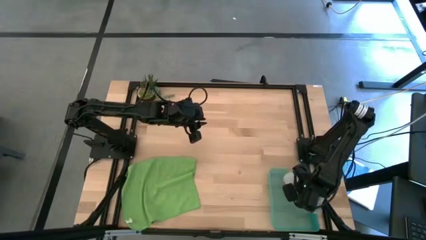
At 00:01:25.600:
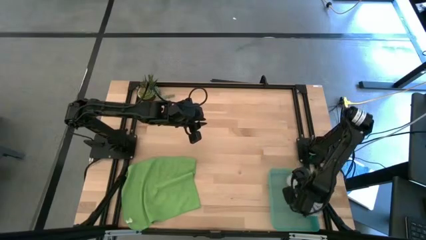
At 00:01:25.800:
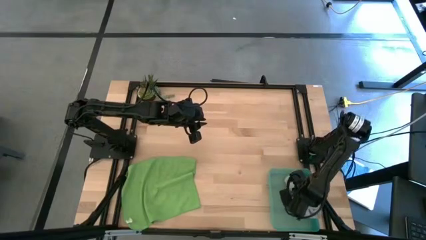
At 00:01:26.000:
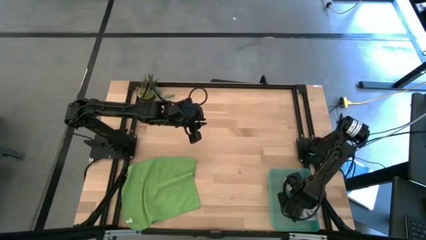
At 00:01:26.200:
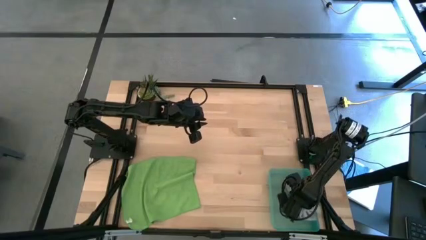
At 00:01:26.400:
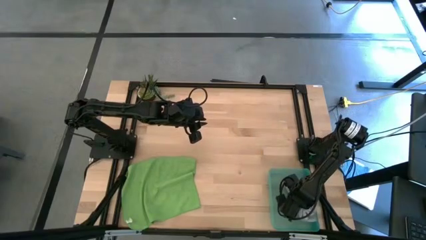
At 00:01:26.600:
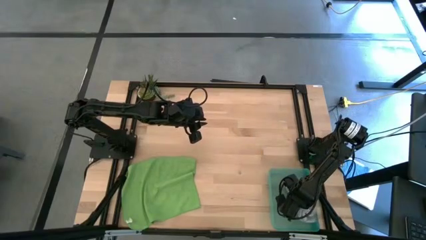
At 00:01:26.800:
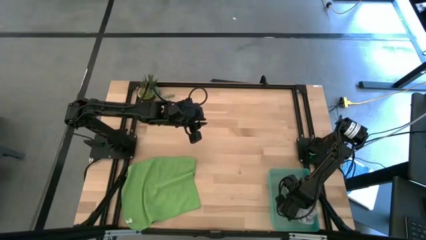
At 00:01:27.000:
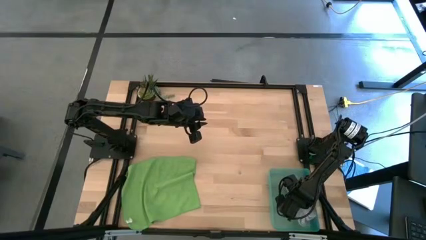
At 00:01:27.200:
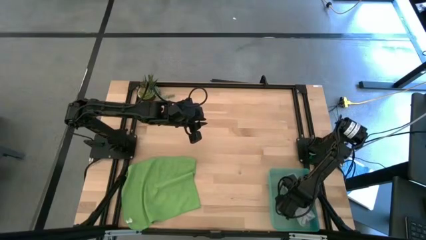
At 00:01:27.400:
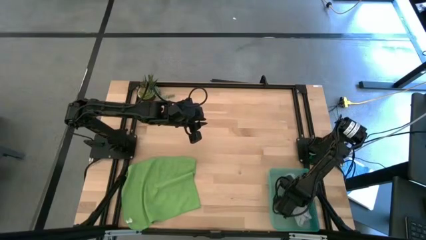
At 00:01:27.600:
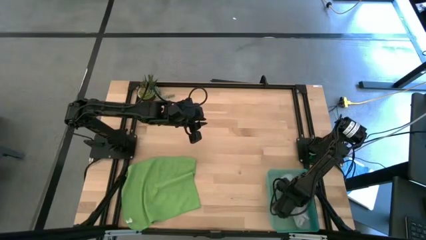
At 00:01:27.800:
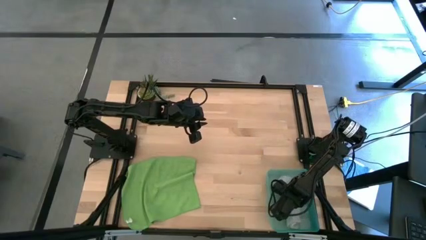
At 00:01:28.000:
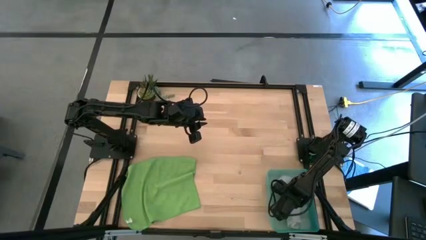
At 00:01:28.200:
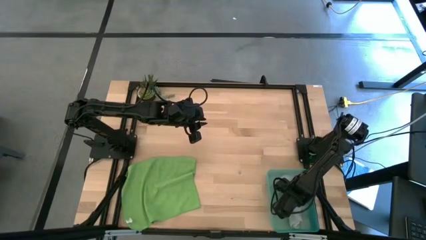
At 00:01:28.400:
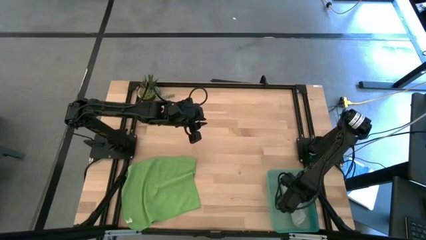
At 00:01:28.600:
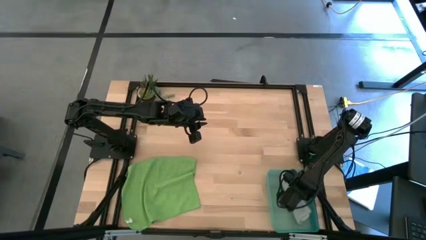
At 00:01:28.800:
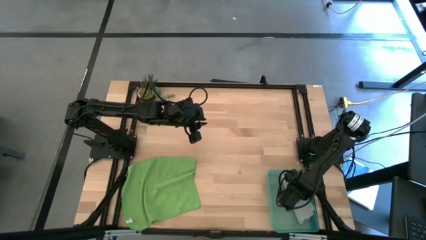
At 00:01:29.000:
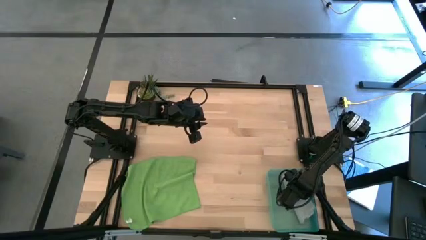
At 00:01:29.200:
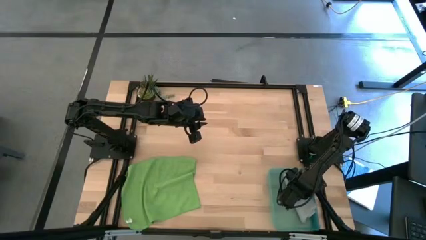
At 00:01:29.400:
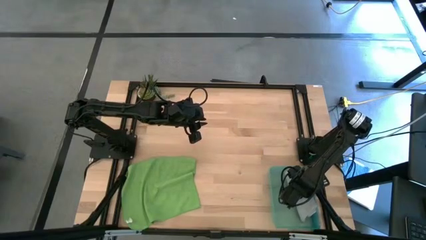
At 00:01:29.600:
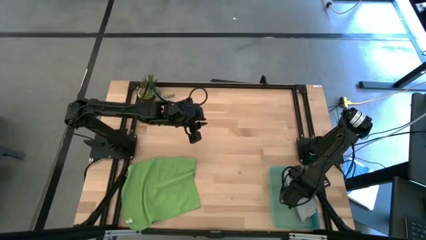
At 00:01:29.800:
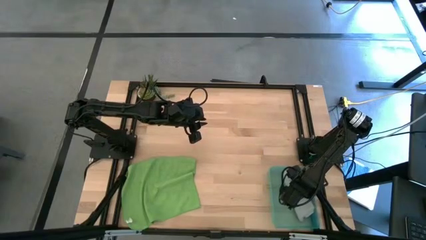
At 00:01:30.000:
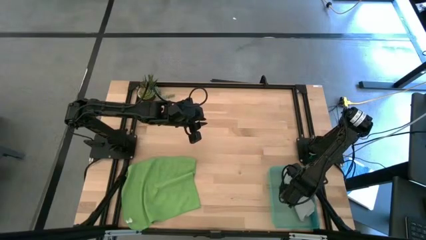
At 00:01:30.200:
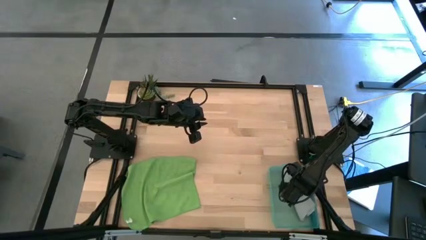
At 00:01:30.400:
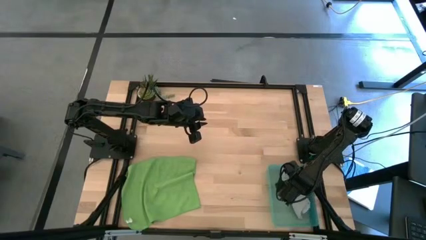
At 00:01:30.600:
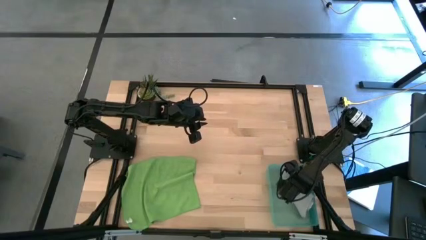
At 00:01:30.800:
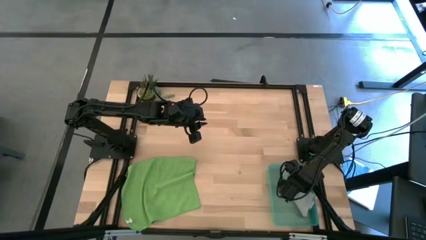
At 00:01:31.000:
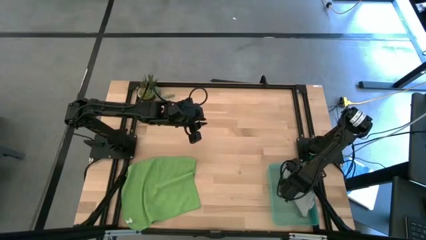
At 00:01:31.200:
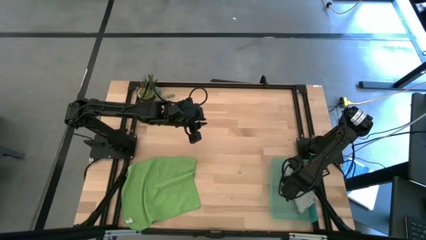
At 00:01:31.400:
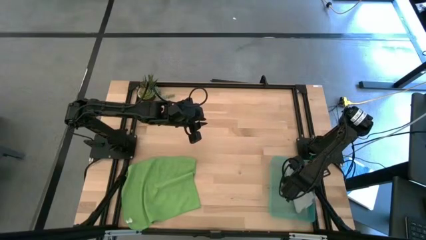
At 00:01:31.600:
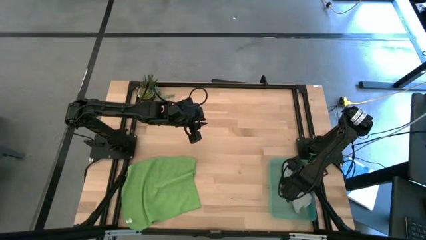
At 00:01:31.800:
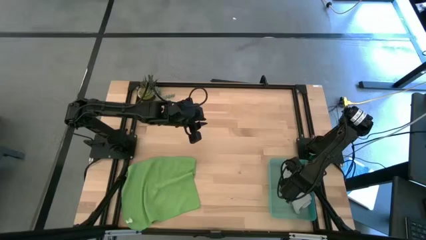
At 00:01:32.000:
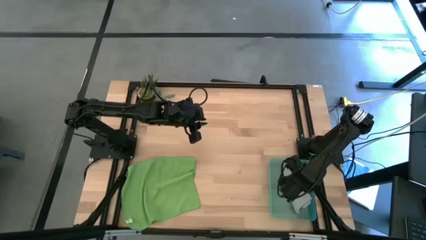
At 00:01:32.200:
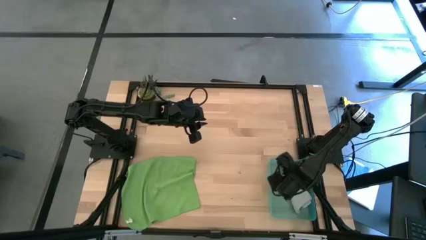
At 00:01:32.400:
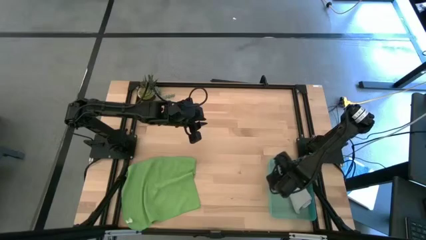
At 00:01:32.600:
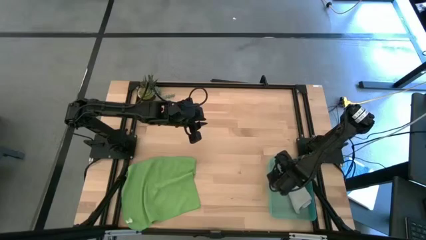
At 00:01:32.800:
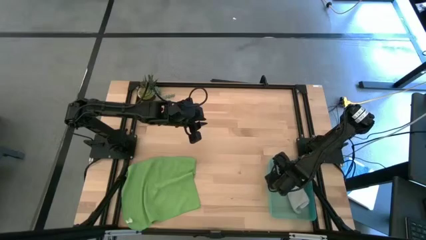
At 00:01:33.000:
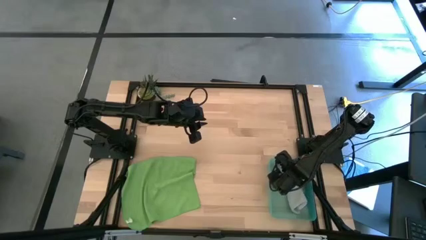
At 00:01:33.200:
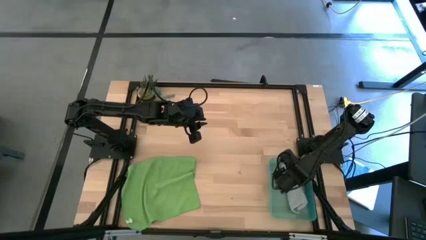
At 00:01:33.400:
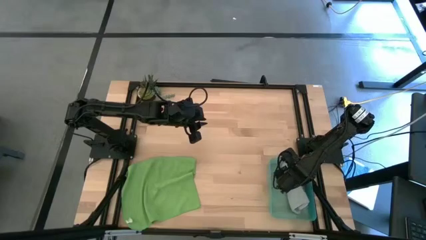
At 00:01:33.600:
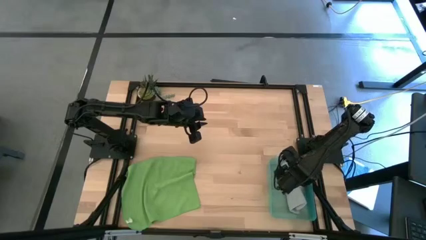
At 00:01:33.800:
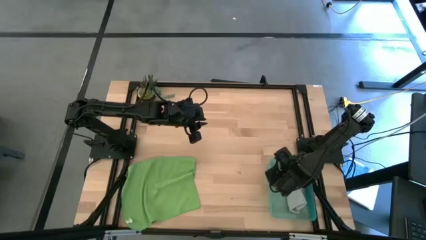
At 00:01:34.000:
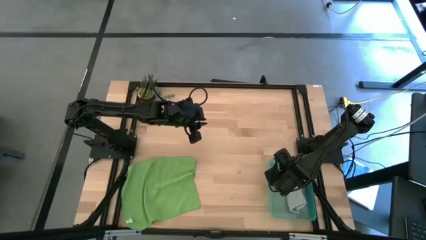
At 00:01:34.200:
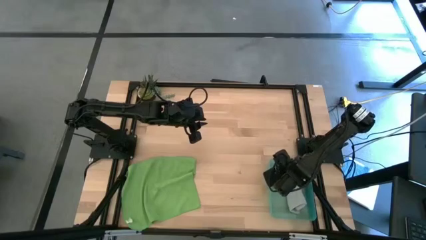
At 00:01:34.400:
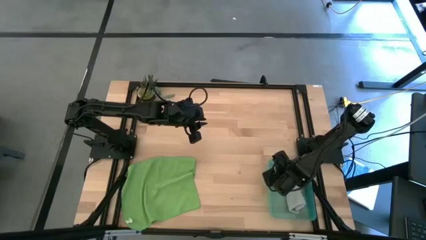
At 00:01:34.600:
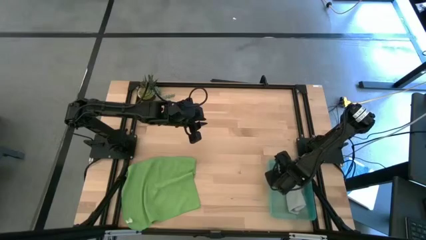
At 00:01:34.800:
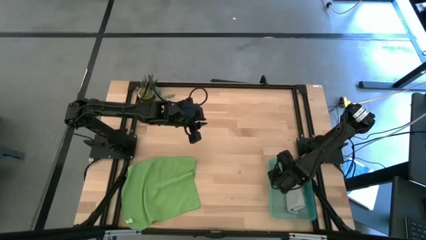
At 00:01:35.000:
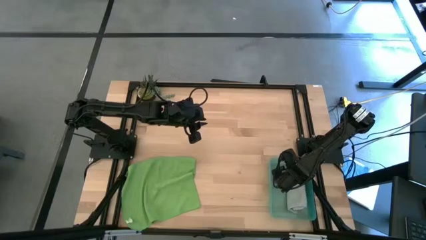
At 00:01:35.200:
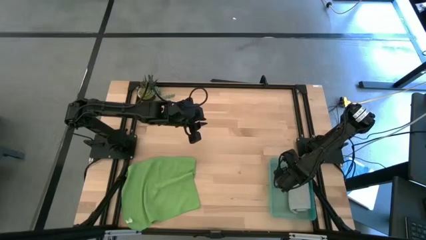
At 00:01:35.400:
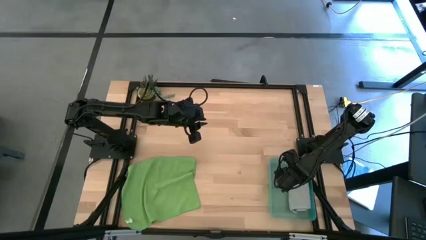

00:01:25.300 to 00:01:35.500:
Task: Roll microfiber towels into tight, uniform cylinder then place into a basket
Put the gray microfiber towel into the green bin

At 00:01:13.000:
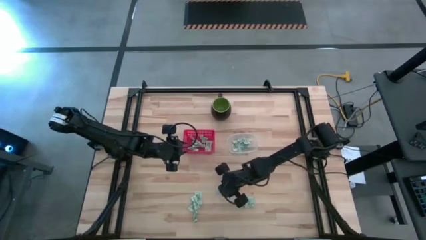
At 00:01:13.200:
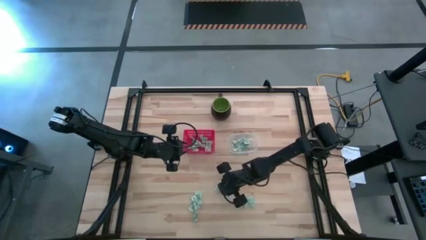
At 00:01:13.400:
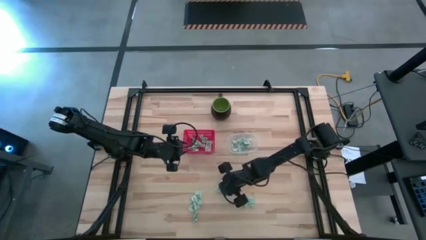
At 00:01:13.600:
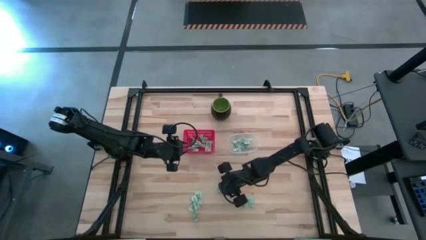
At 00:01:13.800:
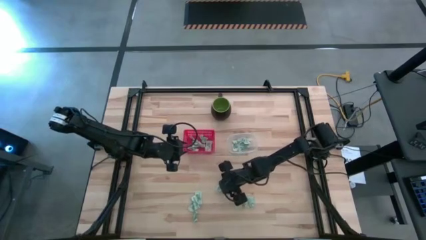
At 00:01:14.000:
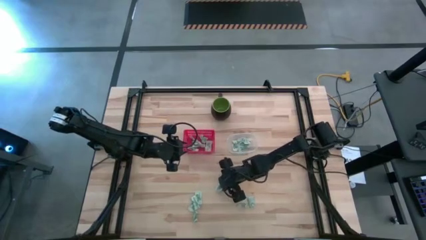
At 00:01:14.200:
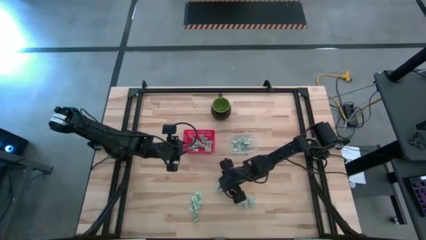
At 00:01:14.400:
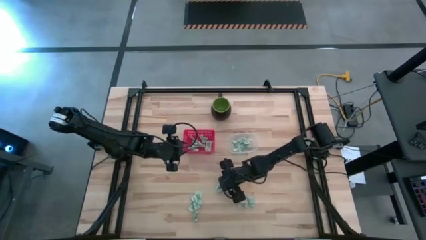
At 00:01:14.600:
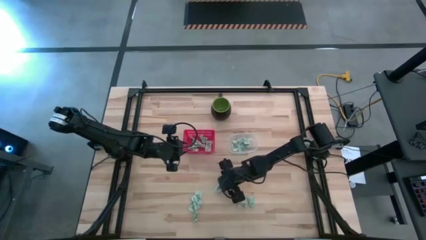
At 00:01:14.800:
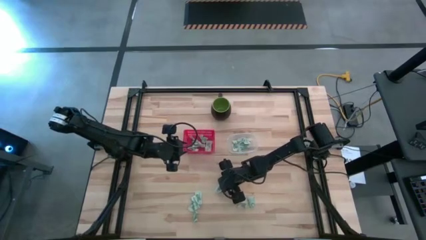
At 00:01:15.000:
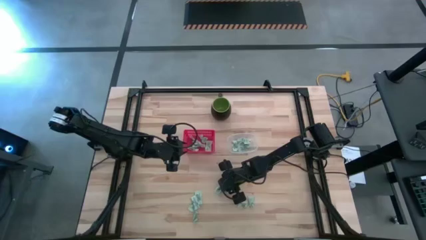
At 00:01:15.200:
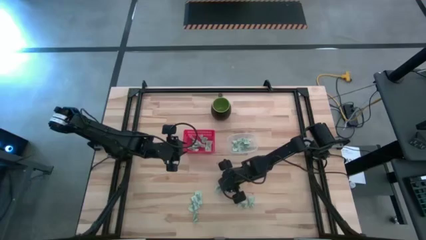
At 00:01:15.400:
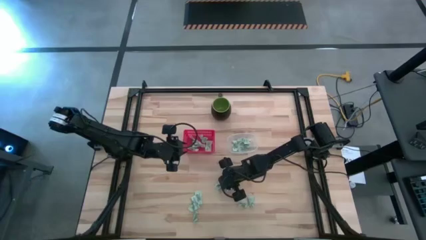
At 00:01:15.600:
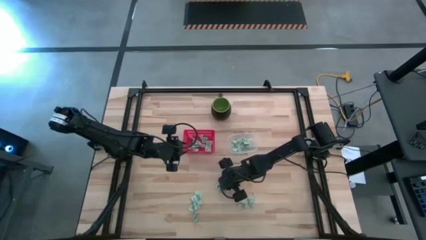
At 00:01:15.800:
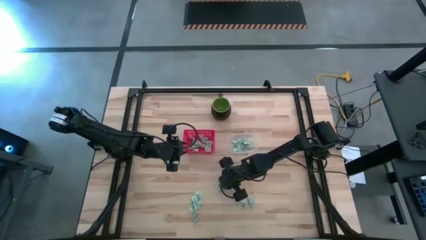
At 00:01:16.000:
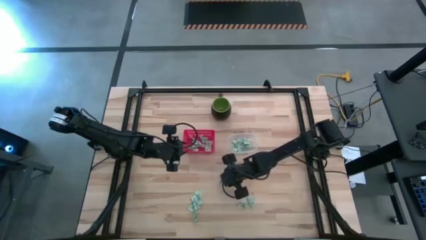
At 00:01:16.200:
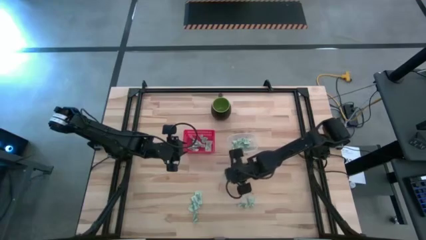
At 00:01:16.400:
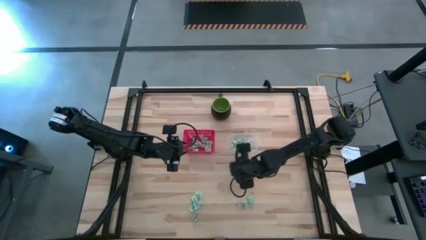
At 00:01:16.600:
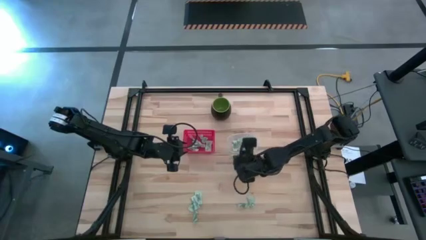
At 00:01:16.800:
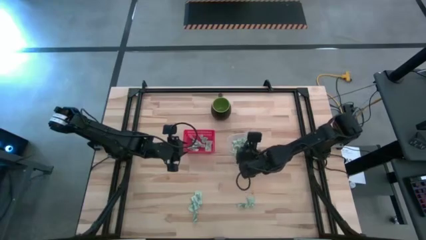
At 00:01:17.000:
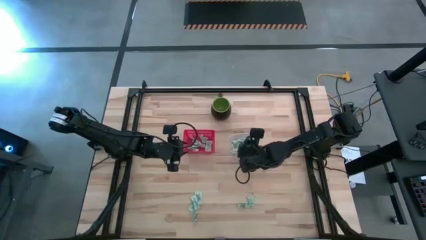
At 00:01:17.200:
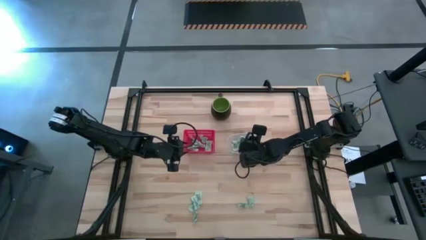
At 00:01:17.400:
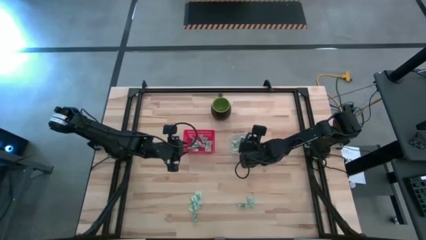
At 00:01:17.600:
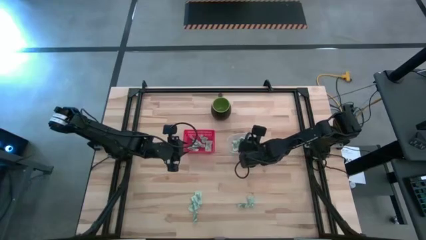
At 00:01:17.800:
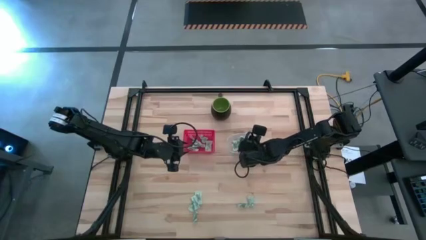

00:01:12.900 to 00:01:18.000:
Task: Pick and place items into bin
Put the stevia packet into the transparent bin

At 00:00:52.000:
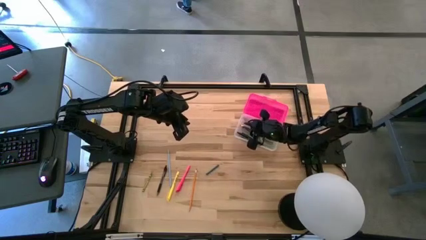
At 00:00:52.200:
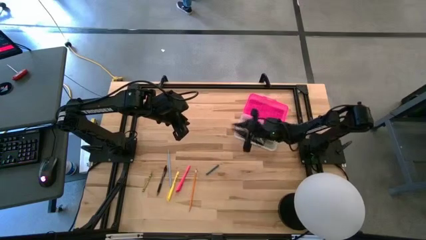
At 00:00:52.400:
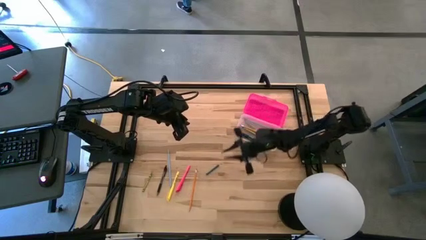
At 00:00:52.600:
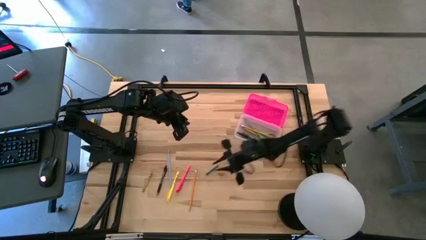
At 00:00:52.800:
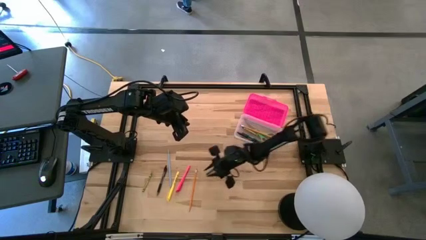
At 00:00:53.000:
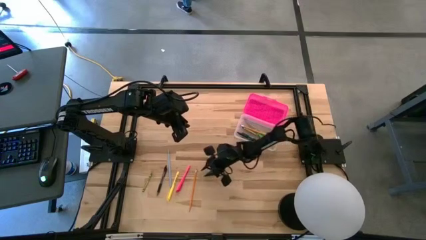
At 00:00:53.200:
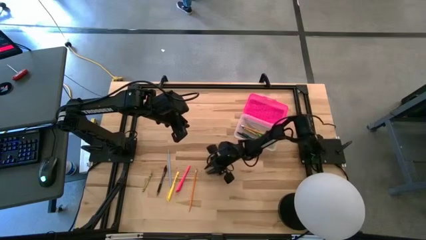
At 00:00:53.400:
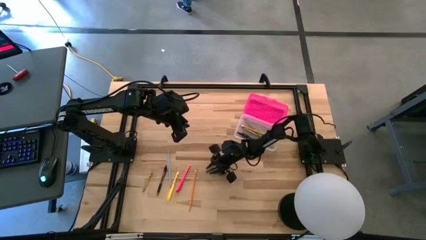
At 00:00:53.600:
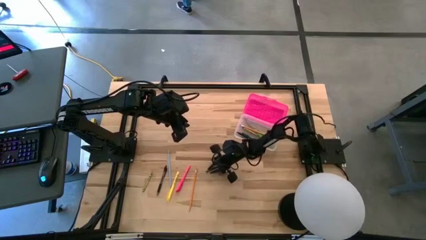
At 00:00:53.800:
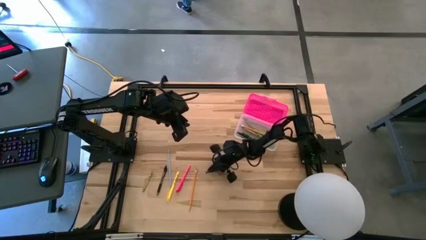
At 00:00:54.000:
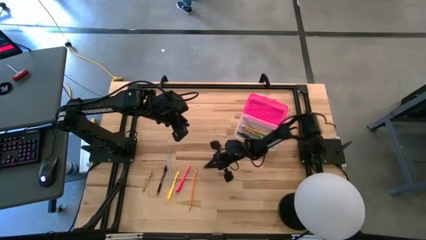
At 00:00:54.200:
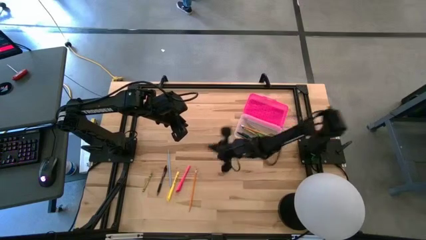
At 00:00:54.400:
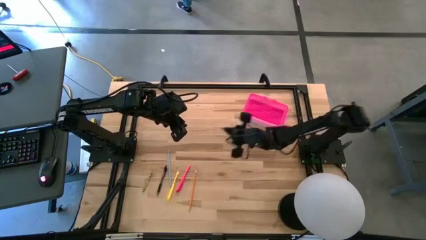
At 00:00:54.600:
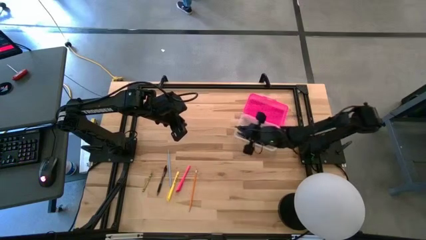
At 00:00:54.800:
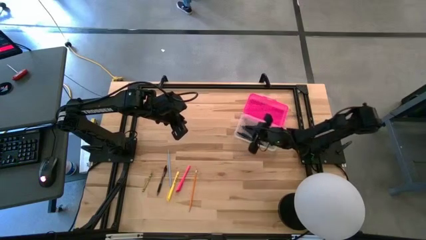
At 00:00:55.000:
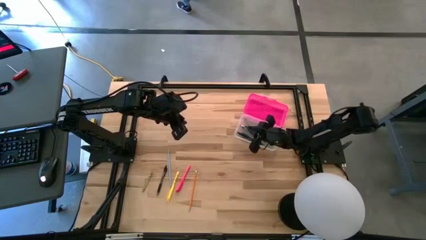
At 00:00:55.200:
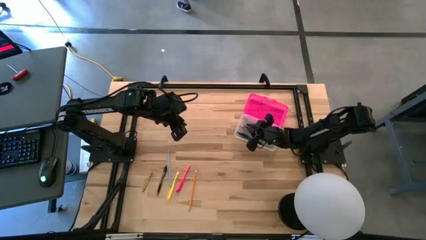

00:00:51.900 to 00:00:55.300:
Task: Pick & place school supplies into a supply box
Put the dark green crayon into the pink supply box
